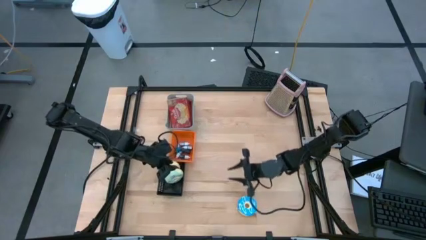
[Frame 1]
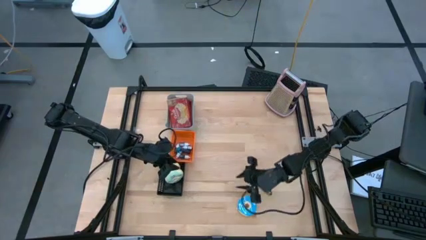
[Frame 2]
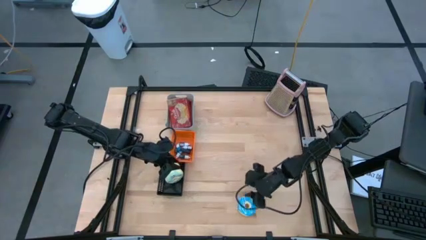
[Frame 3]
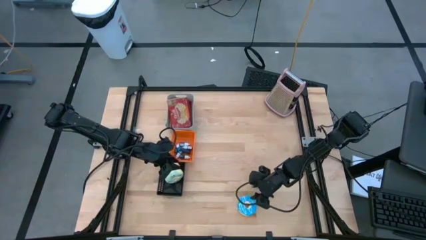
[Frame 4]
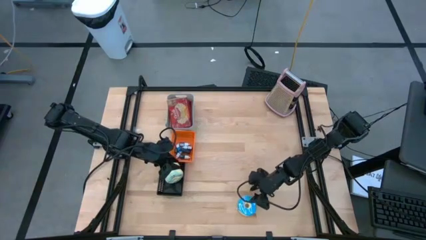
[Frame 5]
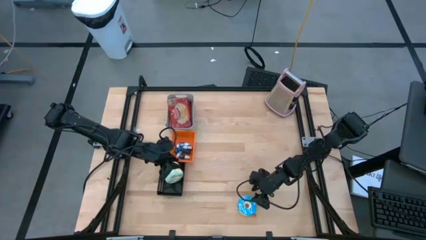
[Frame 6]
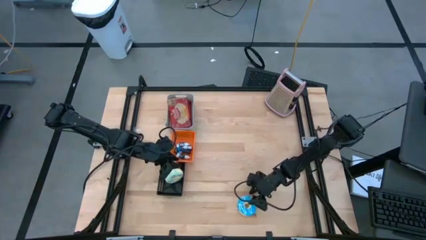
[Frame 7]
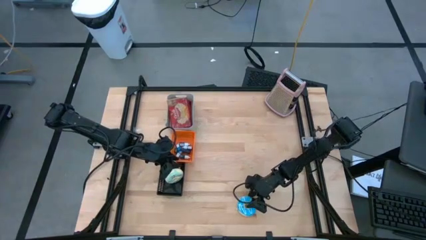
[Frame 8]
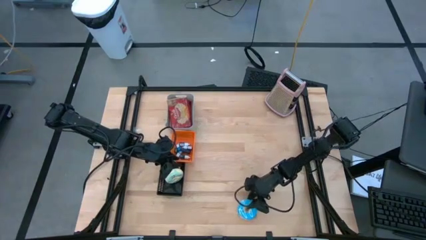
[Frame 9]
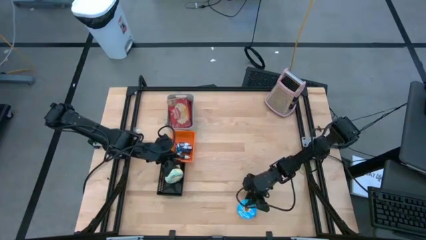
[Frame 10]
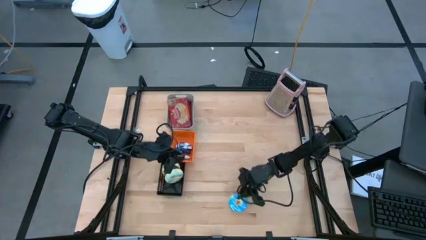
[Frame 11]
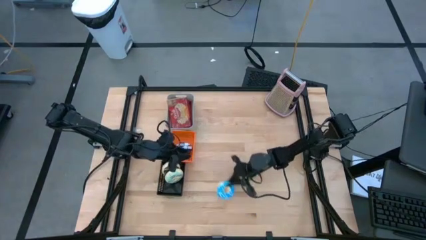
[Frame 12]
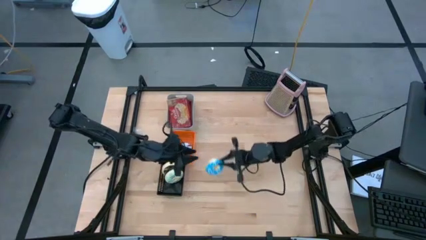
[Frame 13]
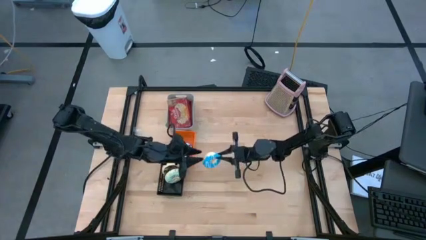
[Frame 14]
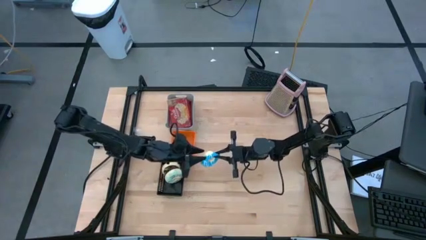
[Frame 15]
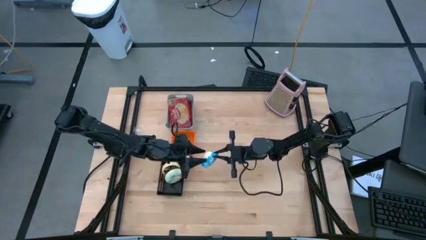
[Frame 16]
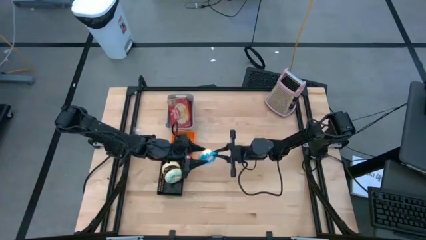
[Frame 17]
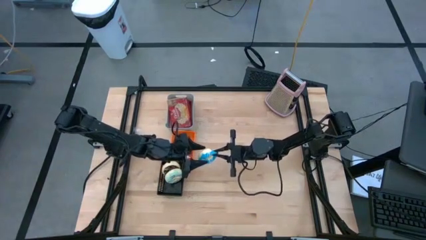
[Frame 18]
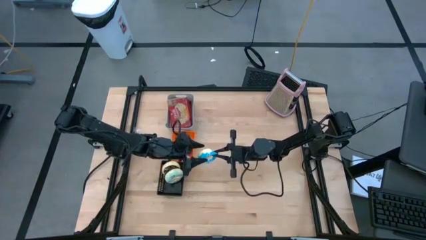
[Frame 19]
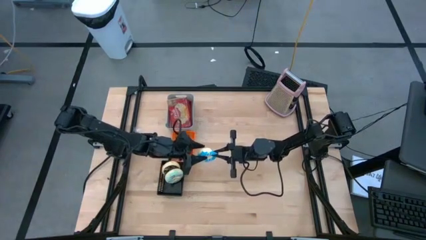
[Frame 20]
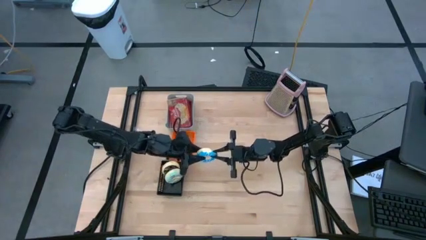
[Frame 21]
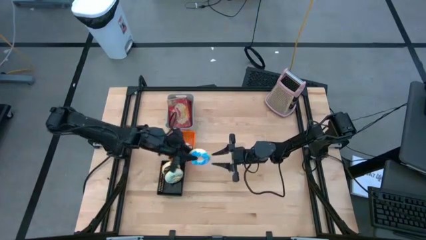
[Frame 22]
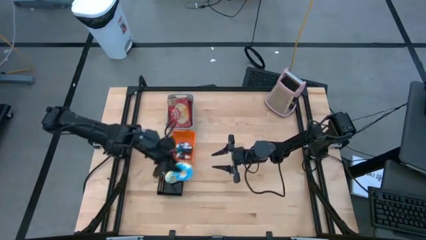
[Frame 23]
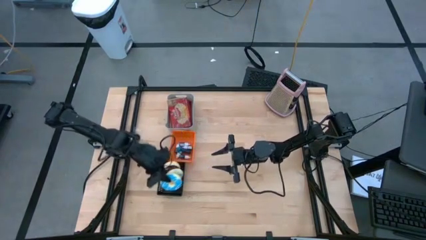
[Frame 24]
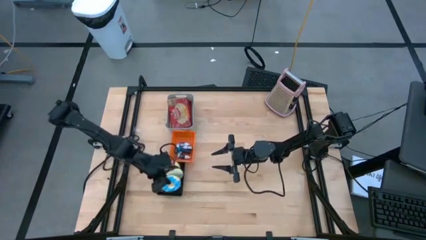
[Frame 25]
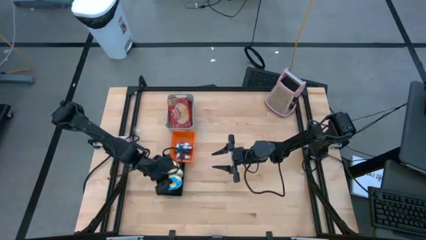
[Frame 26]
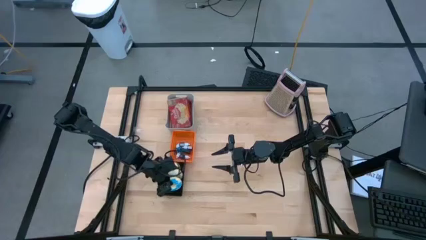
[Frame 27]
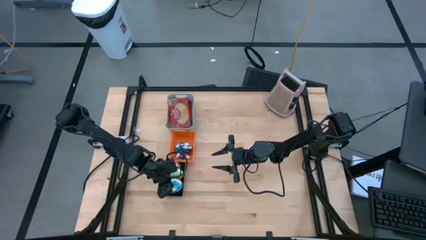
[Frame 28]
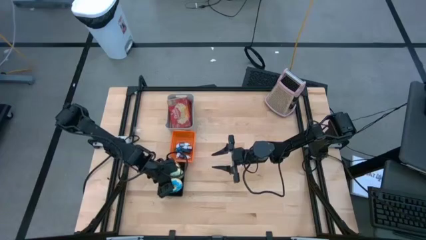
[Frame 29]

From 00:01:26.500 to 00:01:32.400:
Put the blue donut into the black bin

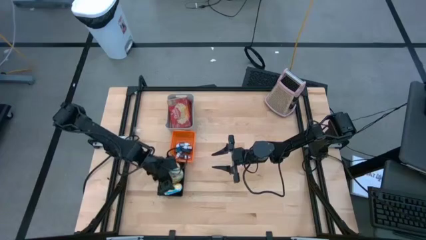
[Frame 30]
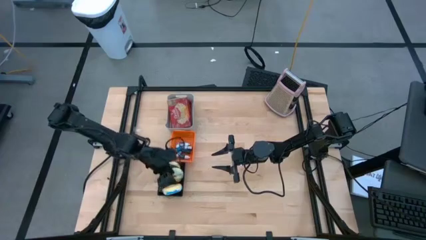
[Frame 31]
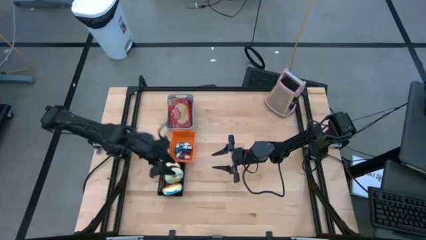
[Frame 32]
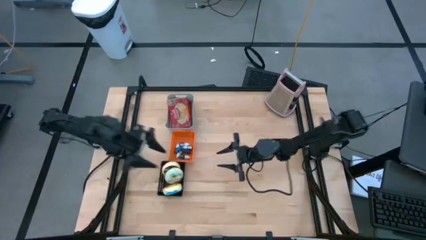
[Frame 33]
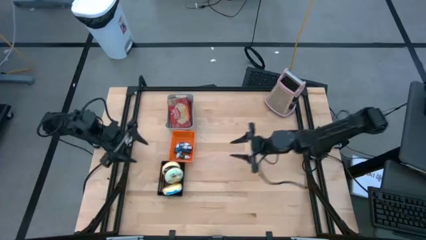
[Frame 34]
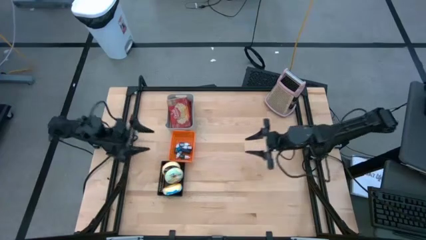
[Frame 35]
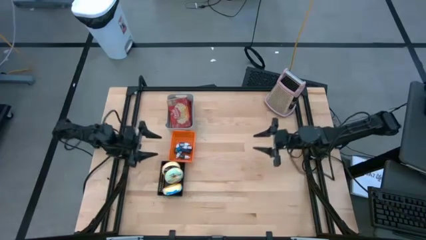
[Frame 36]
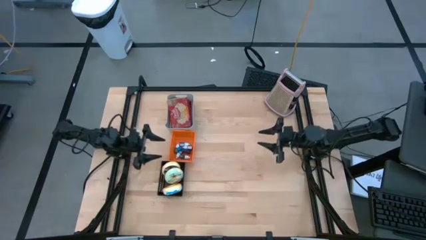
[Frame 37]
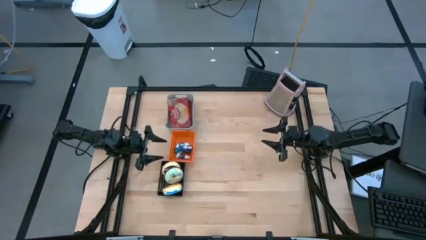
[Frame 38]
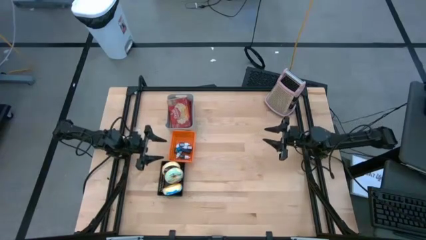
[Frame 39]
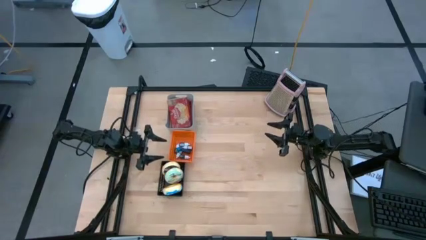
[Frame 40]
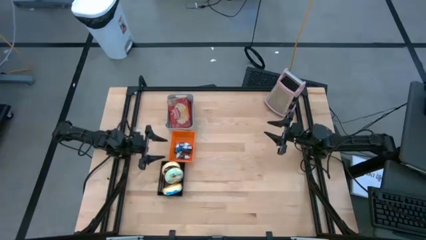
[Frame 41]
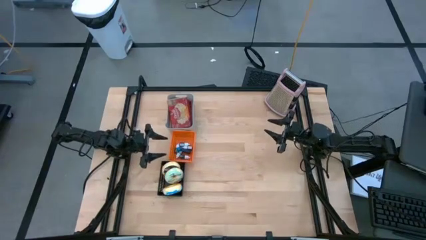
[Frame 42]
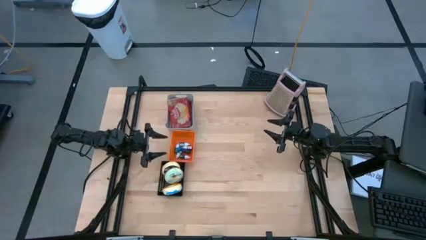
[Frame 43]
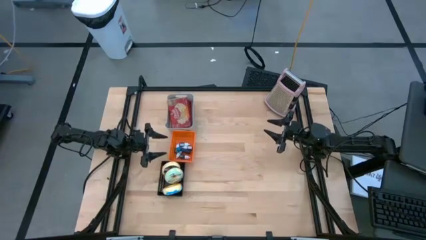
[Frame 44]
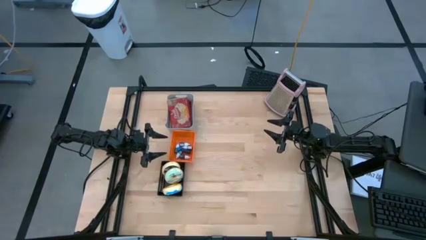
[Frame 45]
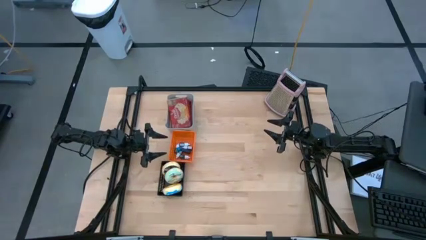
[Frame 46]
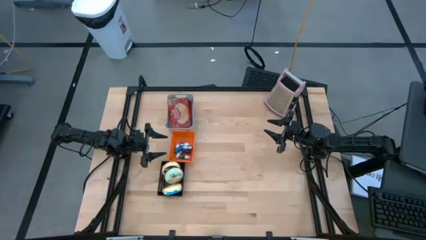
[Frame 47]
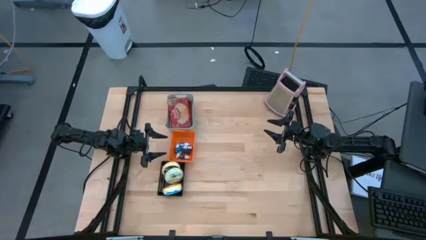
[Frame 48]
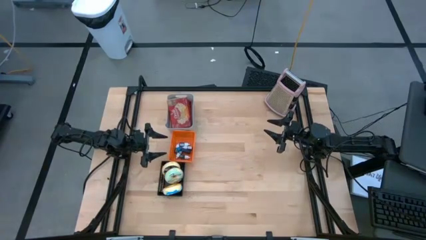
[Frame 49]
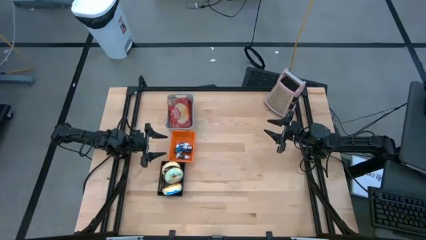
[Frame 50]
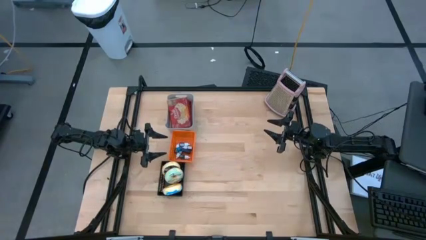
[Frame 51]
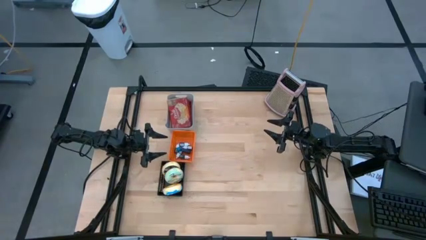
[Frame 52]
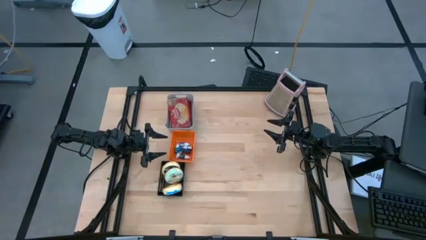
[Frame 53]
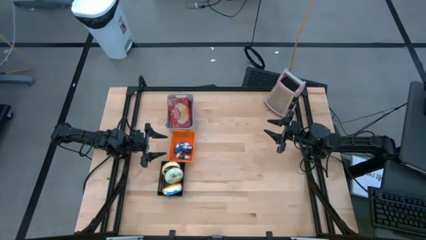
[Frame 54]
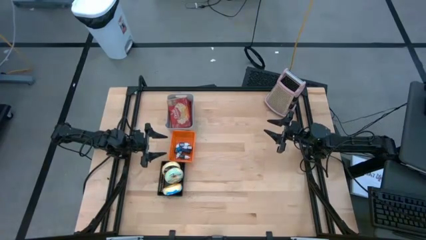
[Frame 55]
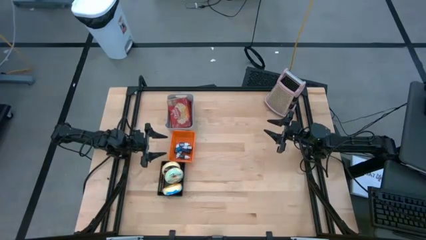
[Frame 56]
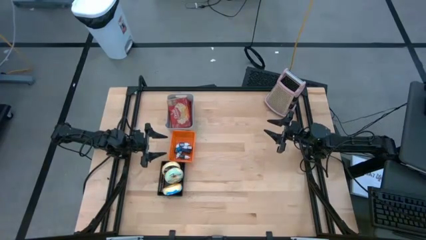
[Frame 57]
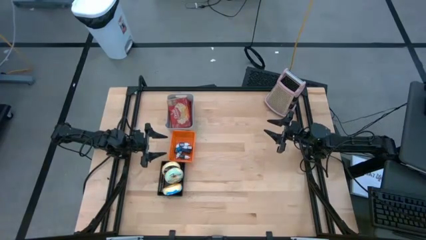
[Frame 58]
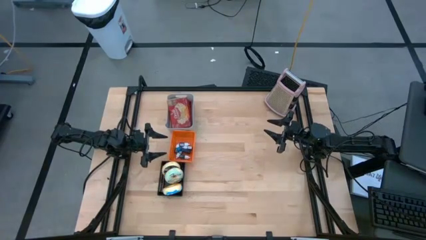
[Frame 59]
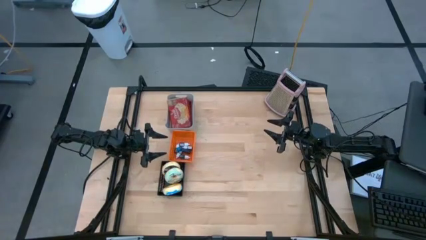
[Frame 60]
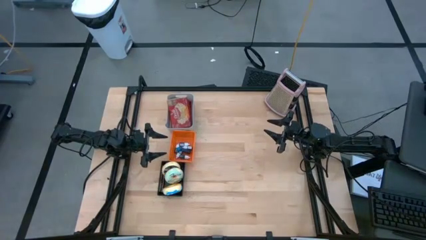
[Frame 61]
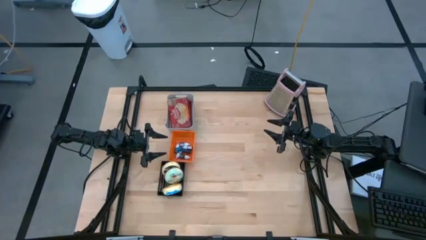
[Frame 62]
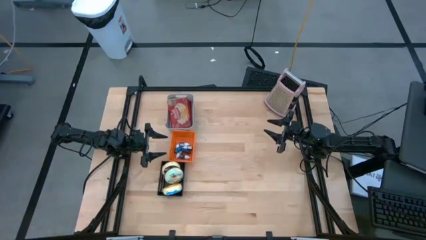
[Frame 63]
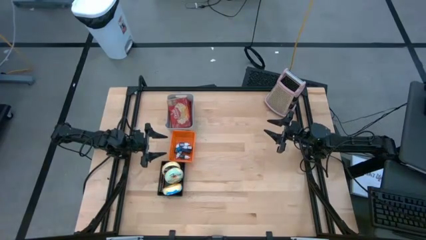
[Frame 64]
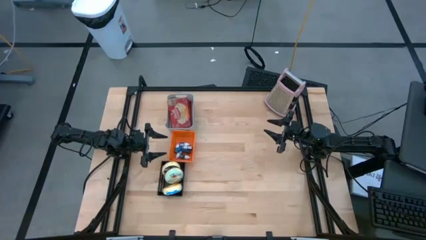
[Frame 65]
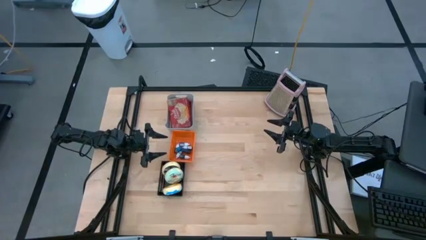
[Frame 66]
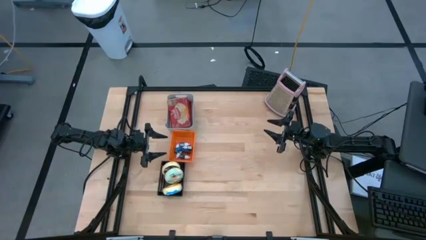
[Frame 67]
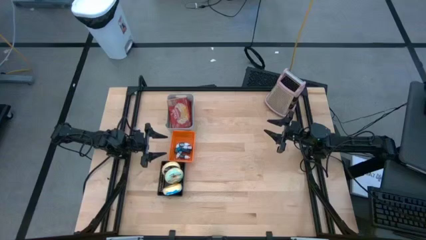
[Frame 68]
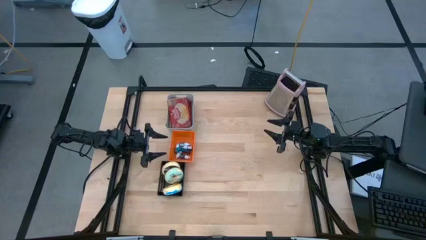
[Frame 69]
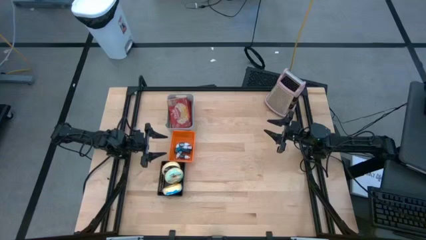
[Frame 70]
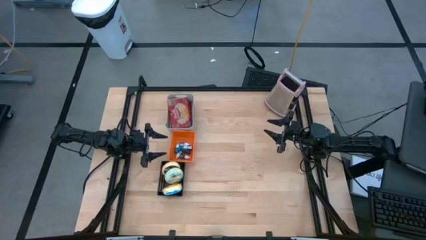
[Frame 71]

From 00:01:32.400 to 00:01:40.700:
Return to Home Position
